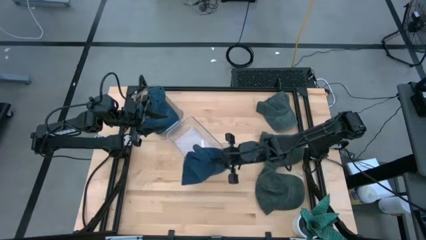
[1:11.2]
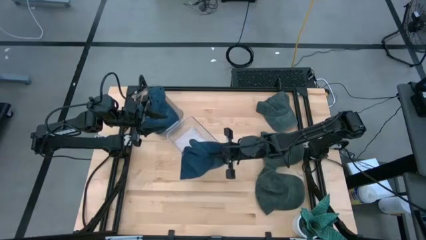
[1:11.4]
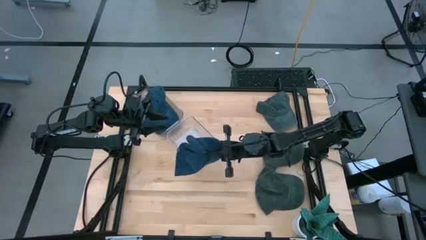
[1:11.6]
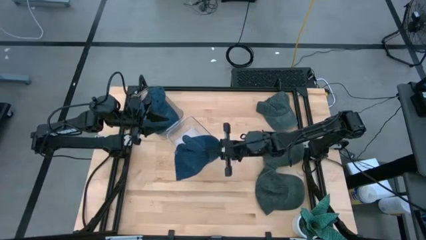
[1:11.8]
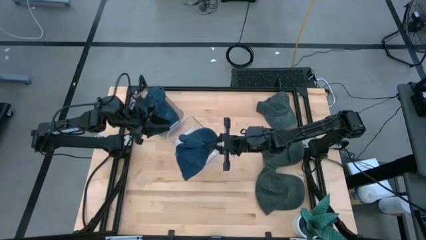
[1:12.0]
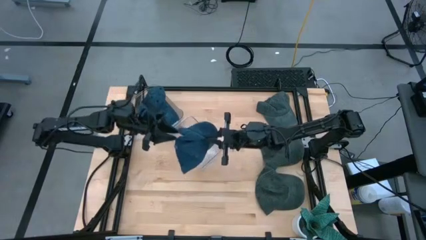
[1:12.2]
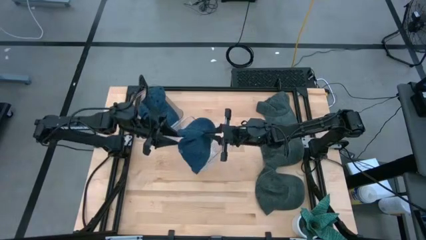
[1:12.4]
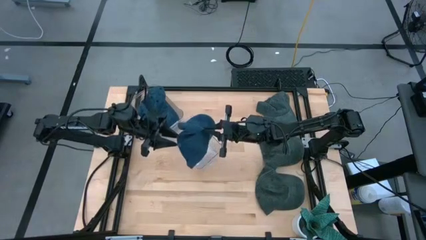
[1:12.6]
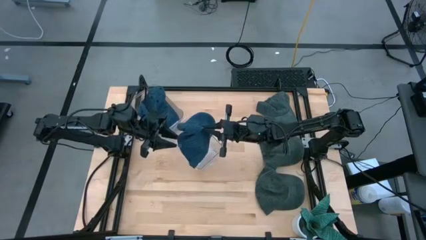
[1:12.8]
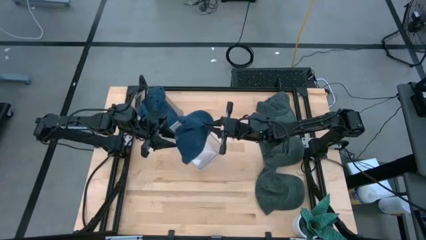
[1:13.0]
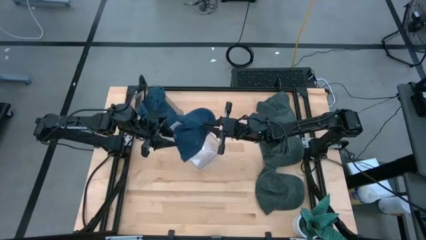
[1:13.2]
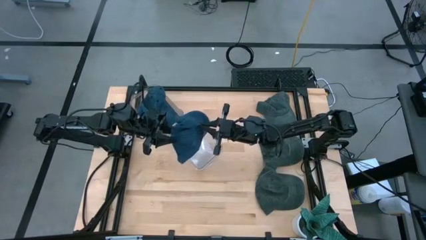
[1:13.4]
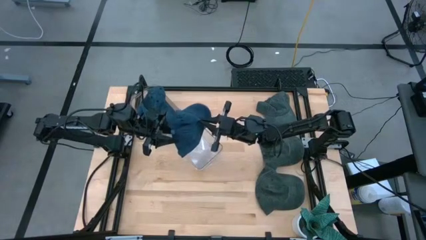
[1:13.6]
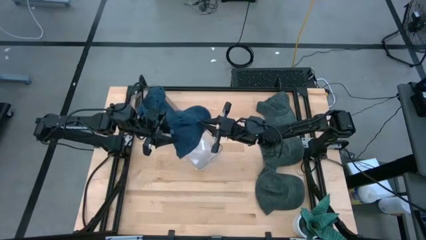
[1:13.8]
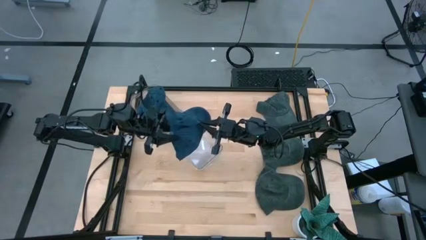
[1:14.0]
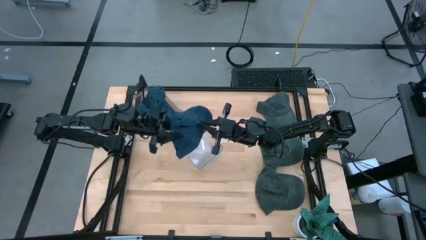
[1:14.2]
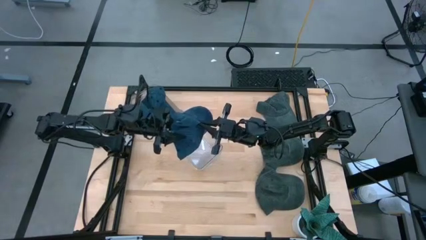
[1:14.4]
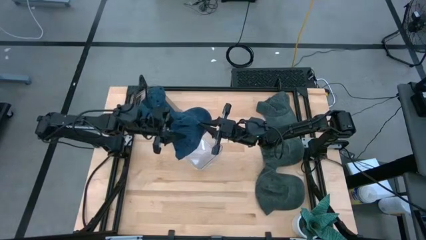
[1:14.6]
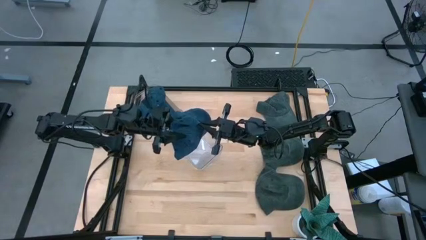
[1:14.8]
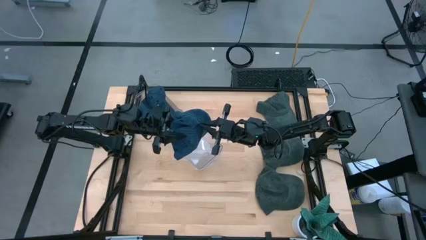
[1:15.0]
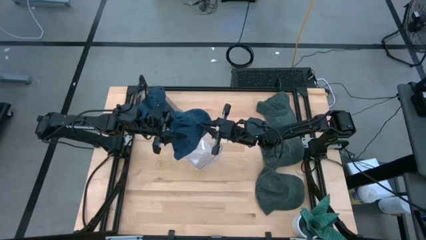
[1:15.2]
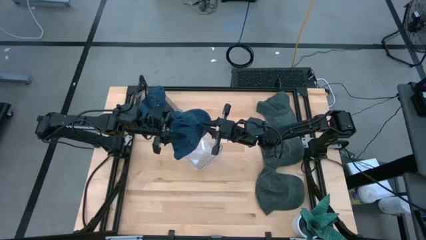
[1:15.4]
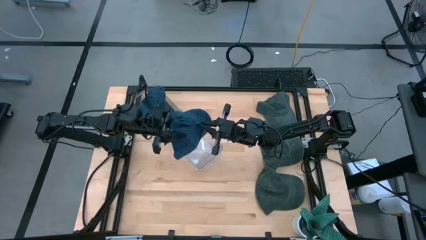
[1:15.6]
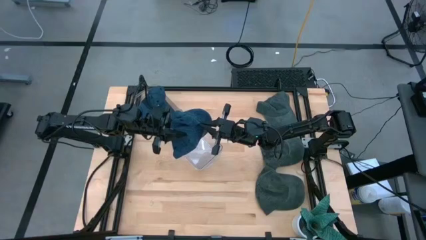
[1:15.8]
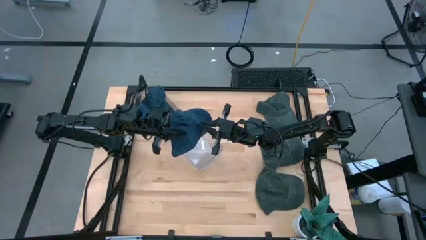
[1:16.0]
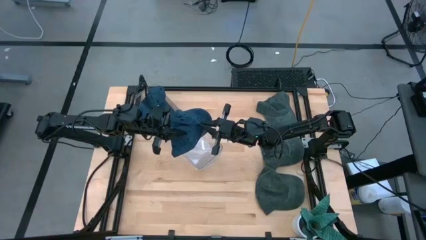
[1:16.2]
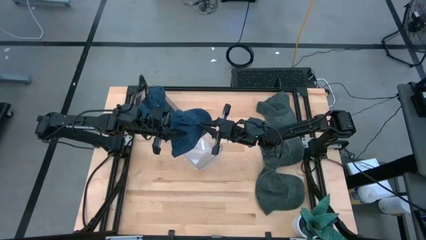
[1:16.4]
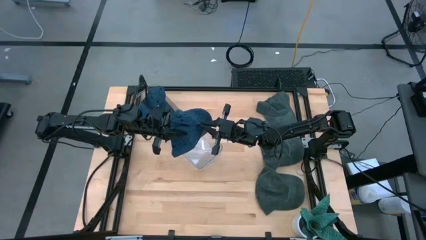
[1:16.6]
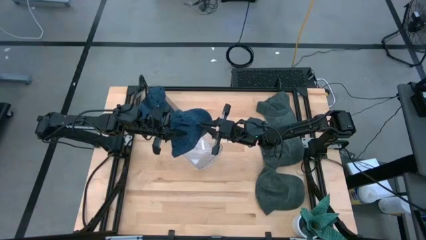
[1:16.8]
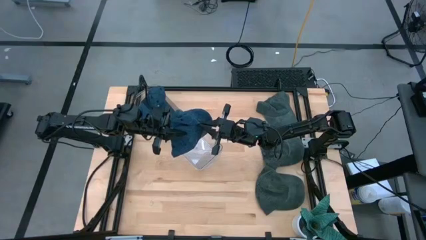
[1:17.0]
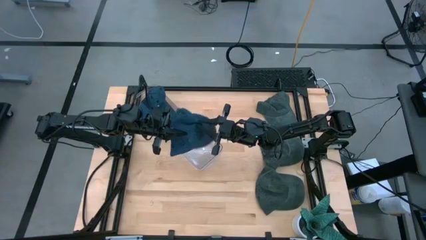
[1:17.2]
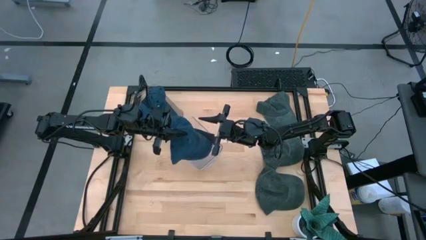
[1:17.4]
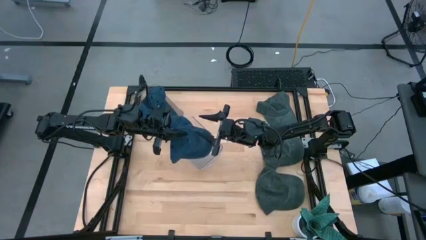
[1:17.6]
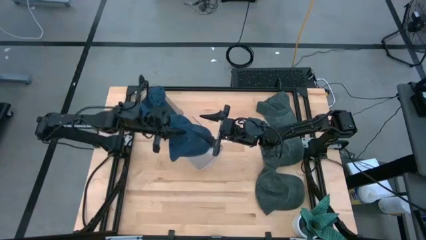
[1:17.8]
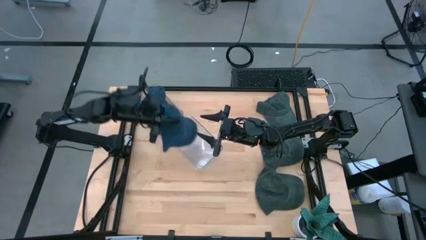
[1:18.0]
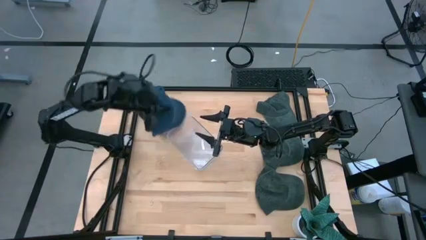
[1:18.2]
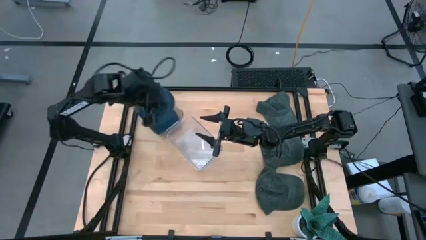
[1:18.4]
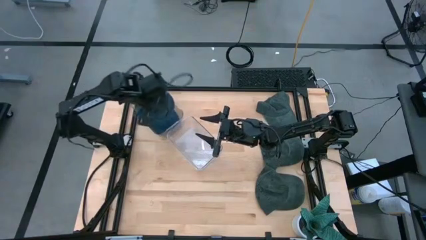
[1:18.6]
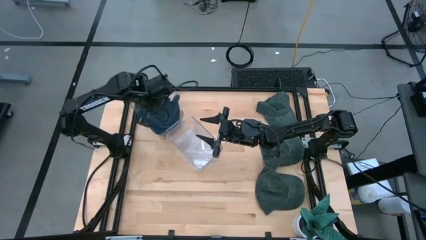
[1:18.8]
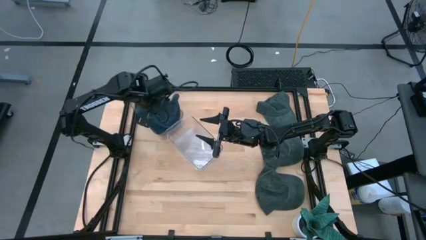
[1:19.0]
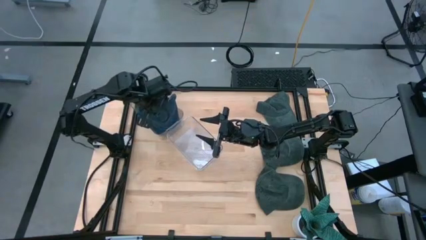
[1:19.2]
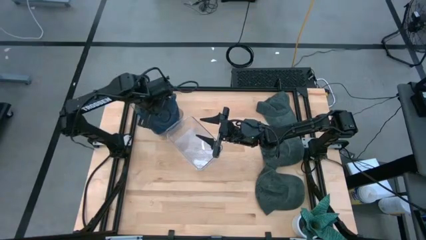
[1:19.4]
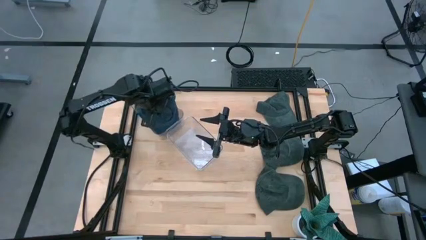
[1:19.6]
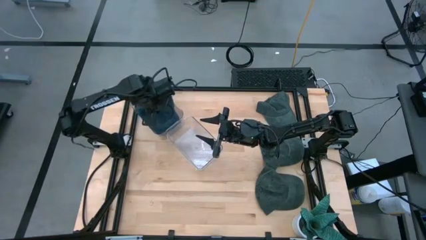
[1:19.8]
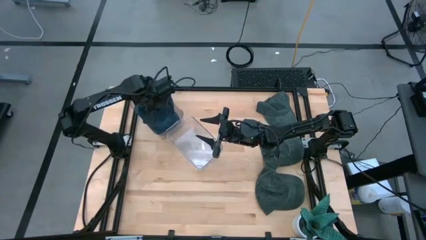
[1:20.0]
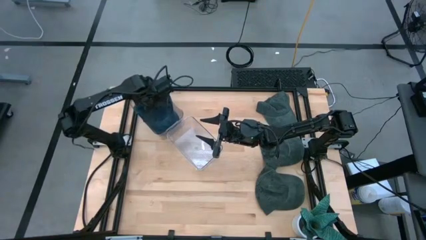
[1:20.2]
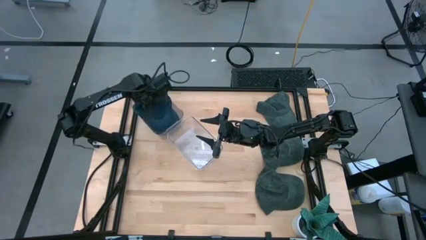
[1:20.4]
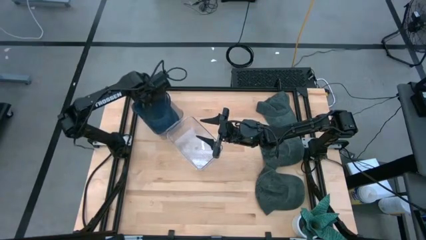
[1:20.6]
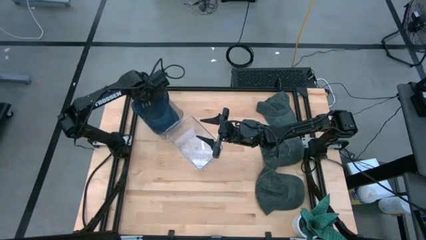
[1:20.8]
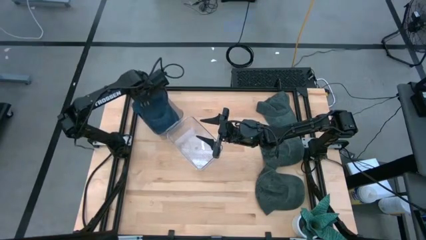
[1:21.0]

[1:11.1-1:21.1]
Task: Pick & Place hat
Put the blue cap into the top transparent bin

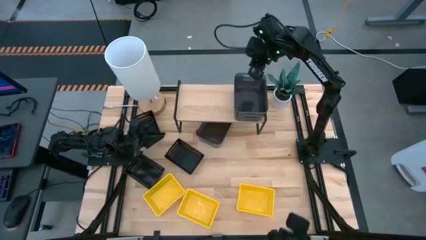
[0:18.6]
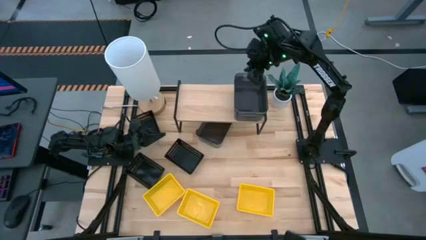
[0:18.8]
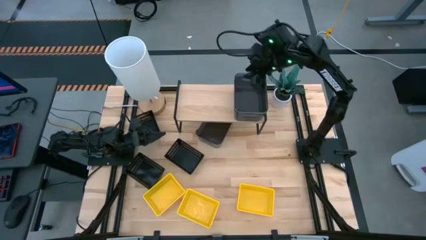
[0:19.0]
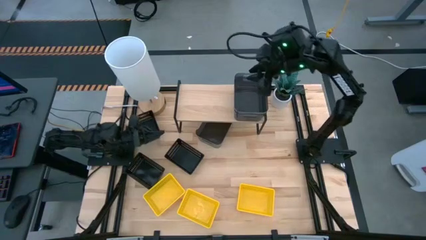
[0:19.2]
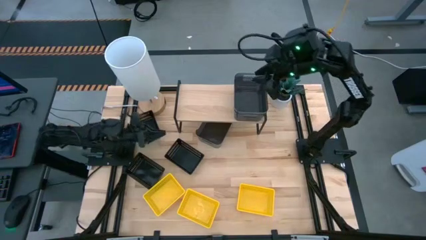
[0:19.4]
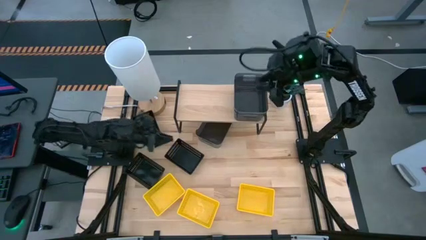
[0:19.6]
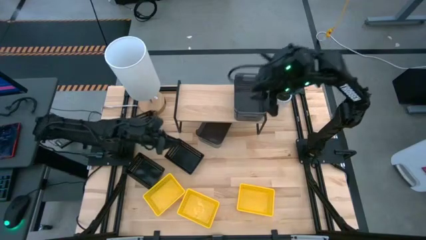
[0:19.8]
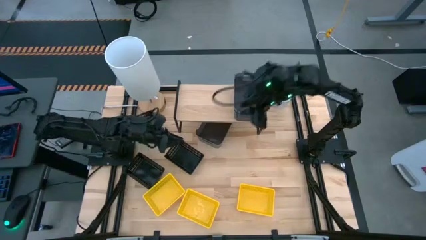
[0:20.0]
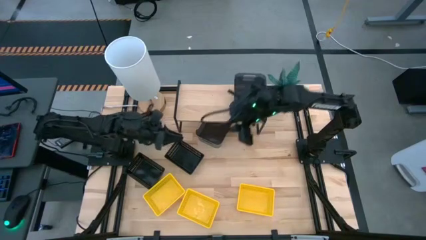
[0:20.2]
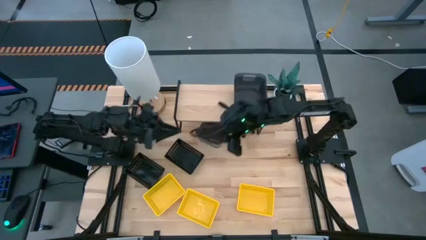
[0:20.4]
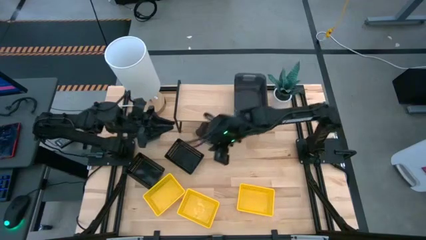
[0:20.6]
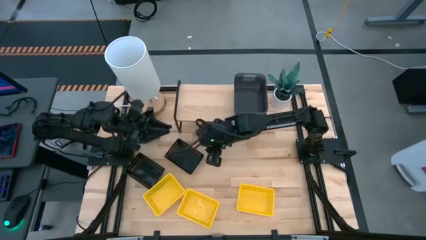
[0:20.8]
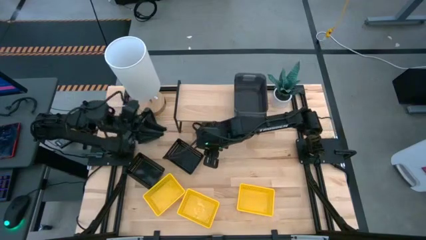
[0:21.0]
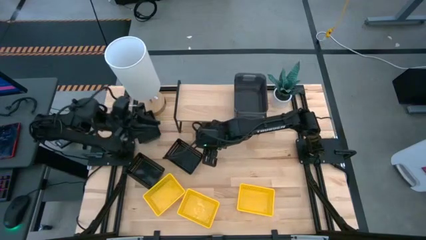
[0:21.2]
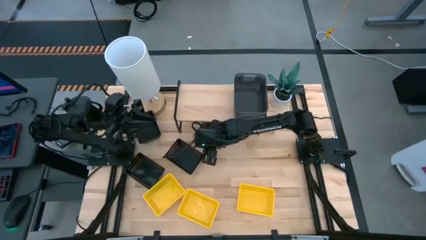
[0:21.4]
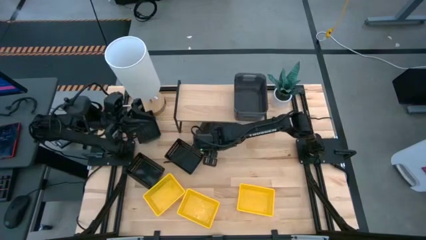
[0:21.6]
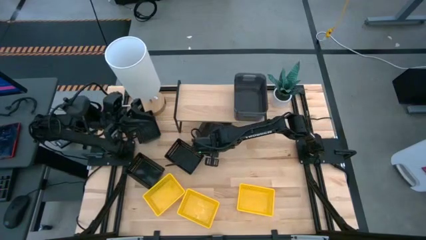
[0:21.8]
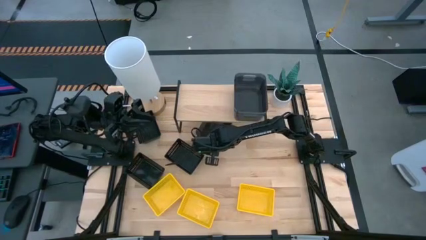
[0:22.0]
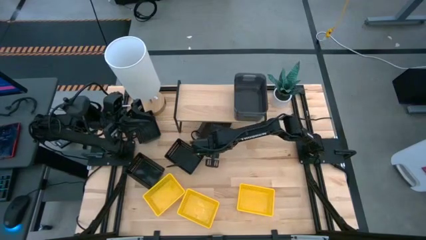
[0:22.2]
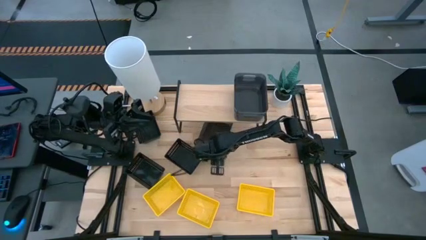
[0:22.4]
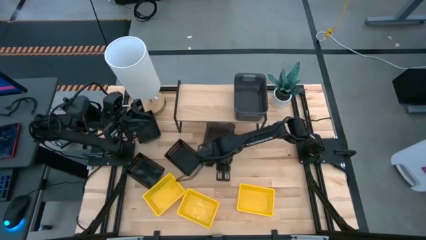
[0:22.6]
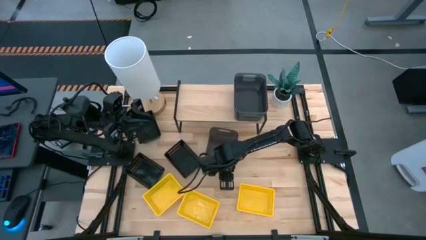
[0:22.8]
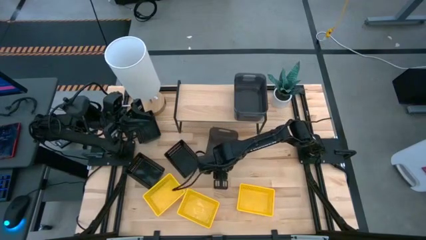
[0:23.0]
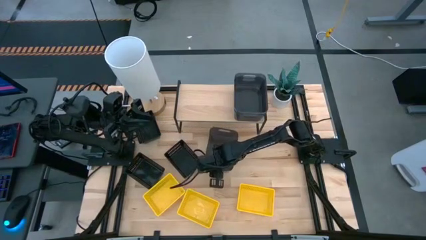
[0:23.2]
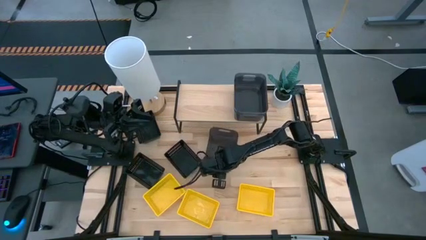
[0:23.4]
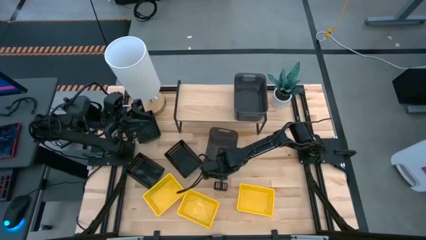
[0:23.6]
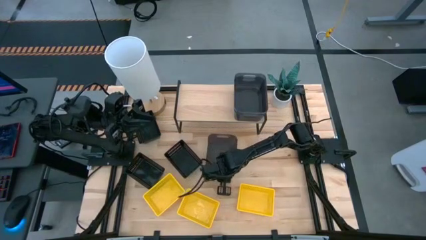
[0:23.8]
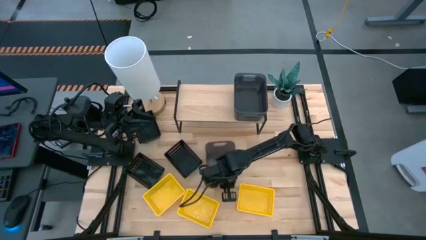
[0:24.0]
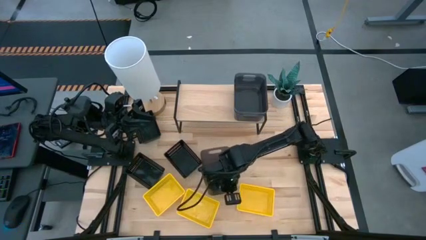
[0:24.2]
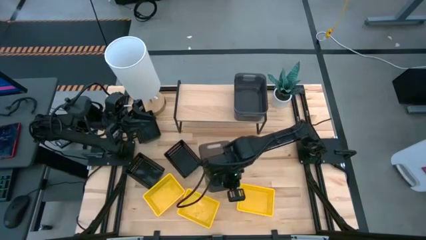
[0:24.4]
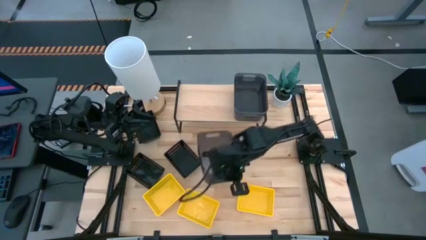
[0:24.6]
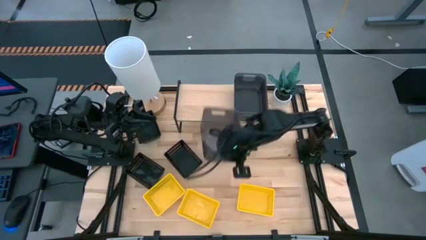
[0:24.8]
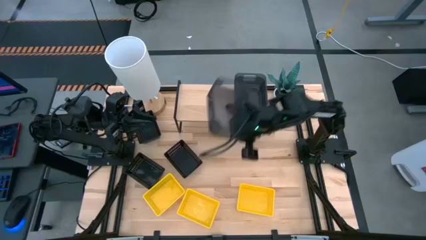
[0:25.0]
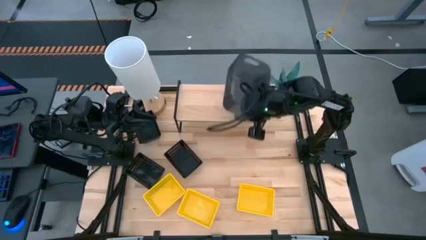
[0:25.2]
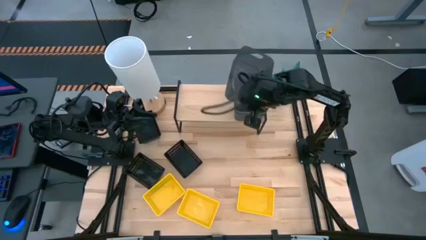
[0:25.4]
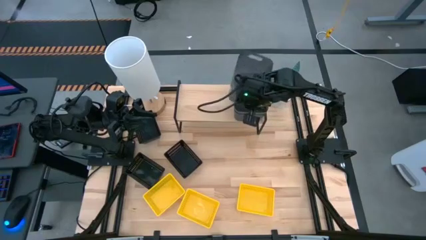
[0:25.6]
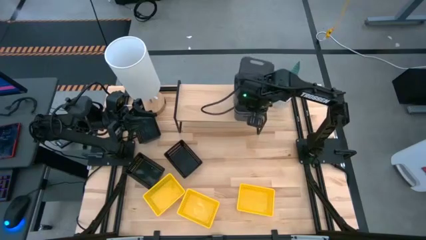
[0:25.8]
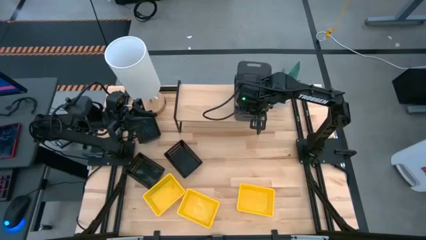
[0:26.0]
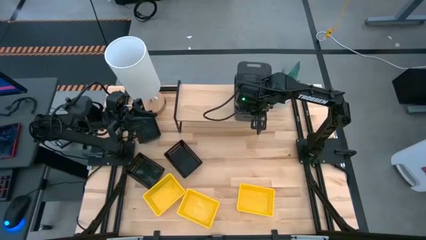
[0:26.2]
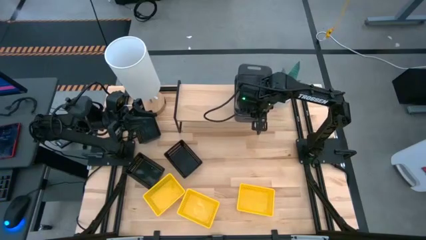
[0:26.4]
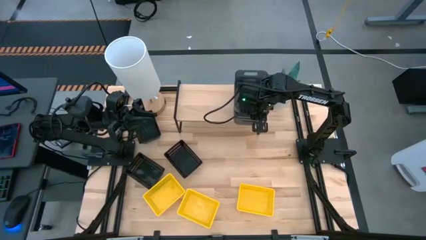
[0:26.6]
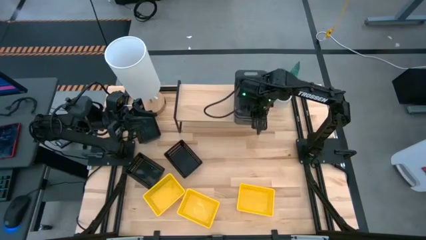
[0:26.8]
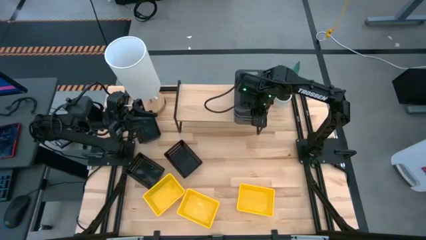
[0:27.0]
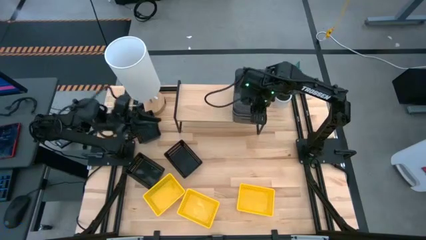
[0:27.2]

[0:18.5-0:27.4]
Task: Stack baskets on shelf by color
Stack the black bin on top of the black bin on the shelf
